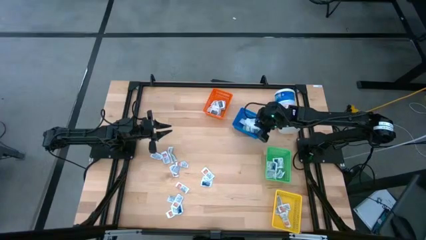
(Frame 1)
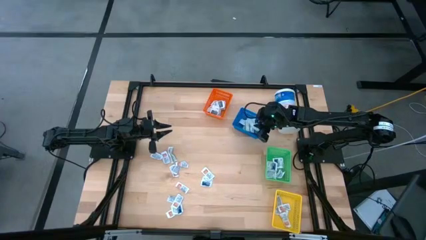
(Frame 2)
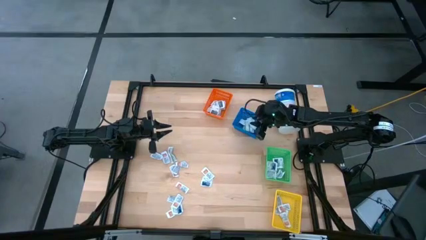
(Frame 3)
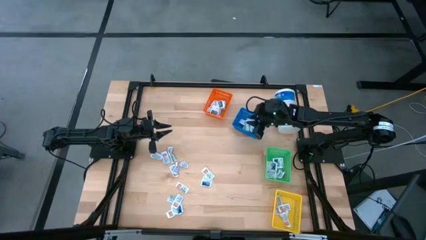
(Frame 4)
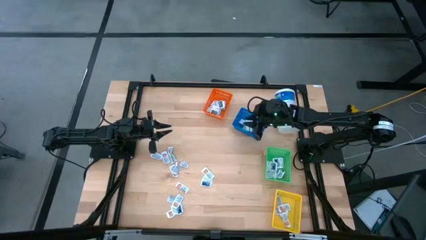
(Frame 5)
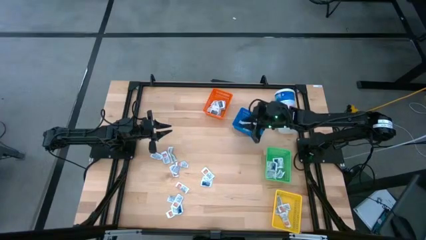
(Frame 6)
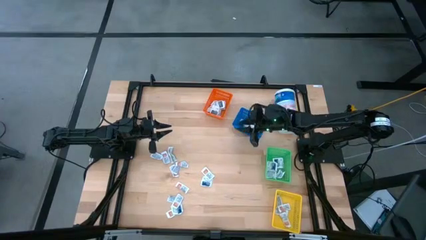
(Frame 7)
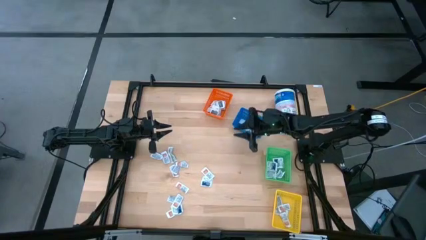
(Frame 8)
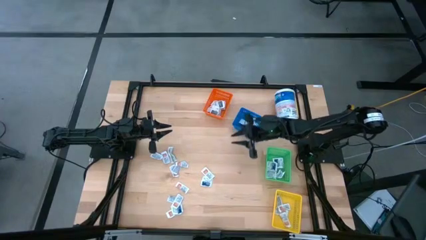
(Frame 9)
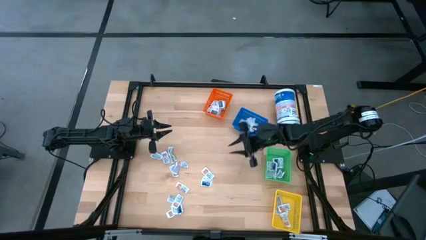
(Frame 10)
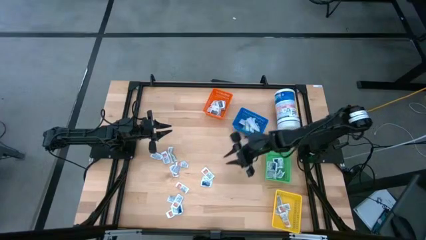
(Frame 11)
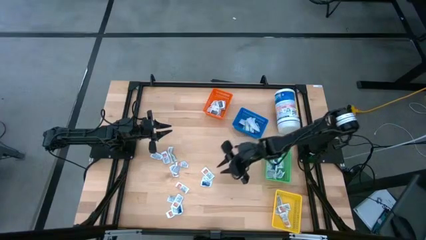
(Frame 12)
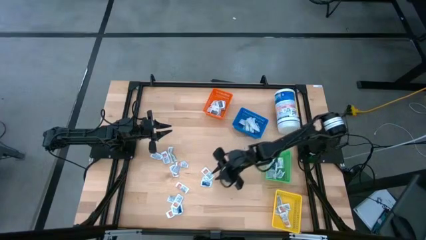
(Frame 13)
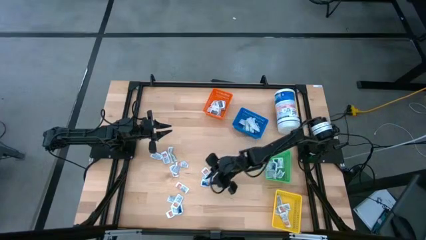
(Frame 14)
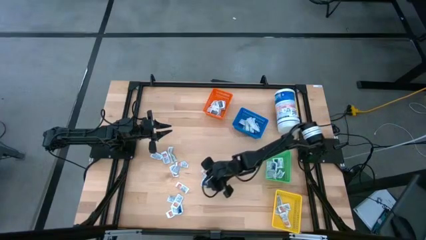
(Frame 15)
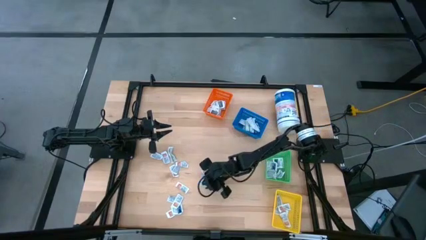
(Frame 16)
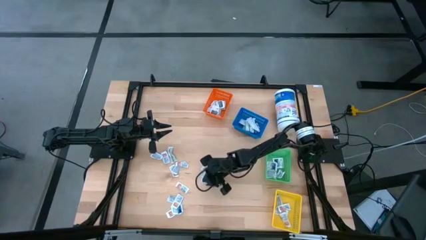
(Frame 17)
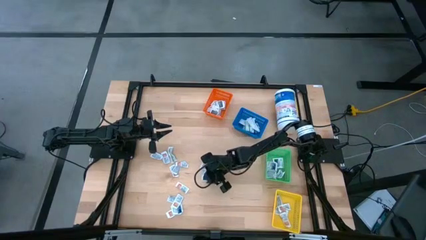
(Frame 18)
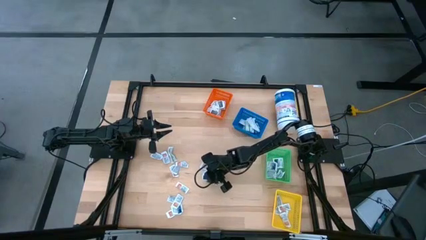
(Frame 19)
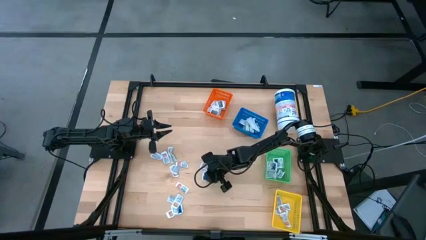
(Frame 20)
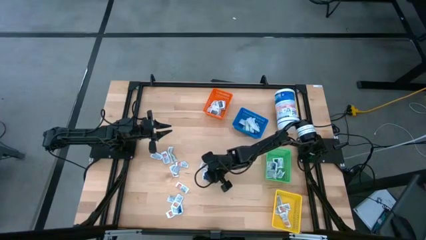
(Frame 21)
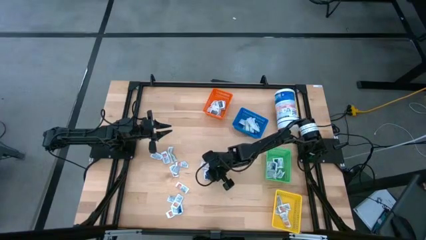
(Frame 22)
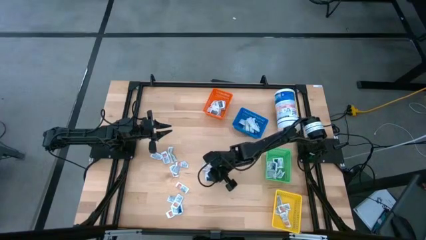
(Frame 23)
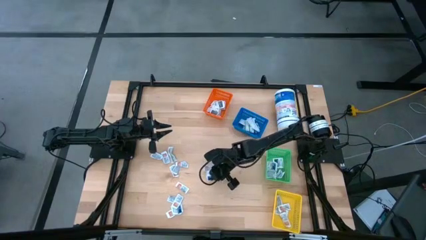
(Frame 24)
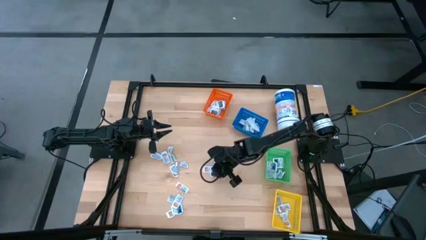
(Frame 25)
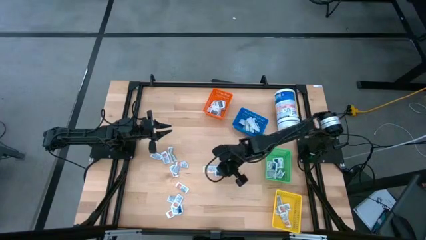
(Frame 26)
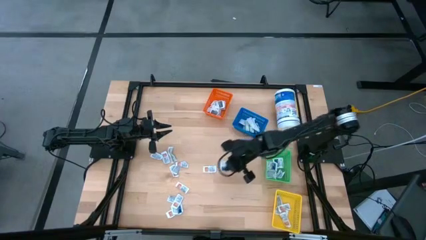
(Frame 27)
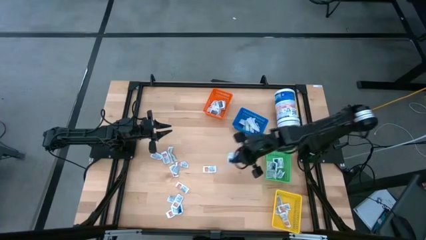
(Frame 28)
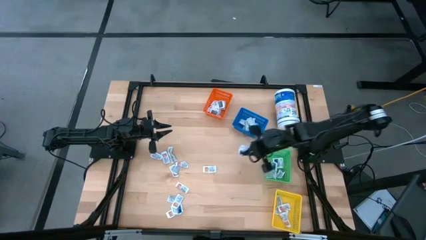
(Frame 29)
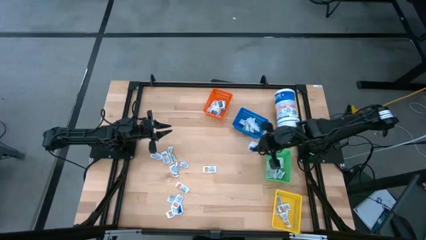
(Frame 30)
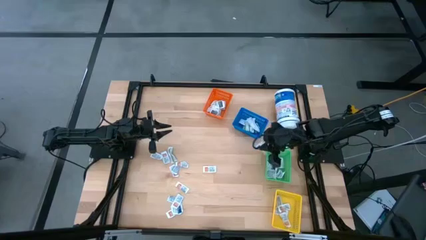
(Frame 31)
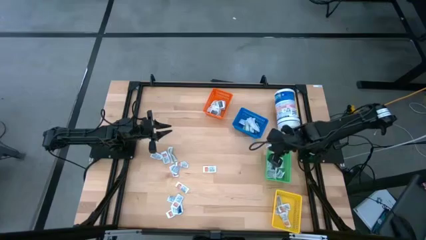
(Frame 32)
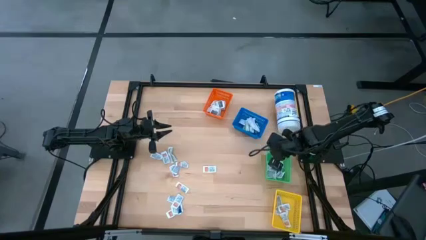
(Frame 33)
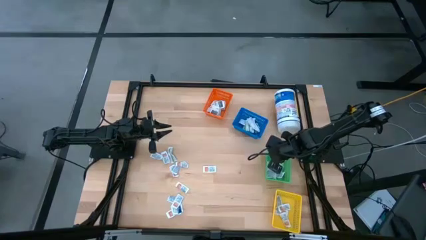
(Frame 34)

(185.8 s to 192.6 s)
Task: Pick & Place First Aid Supplies
Put the blue alcohol pad into the green basket

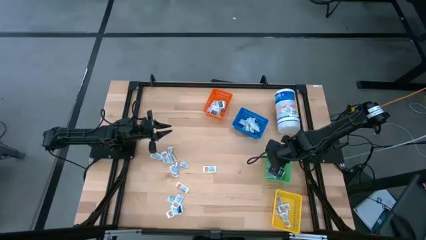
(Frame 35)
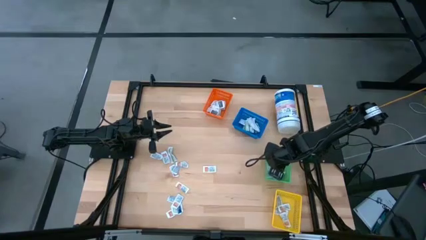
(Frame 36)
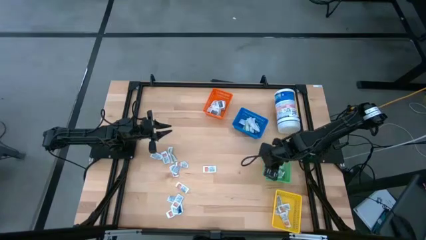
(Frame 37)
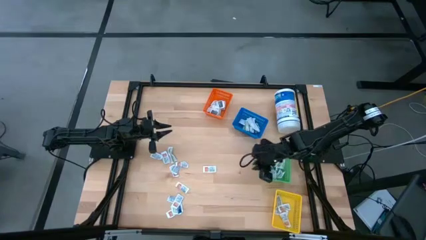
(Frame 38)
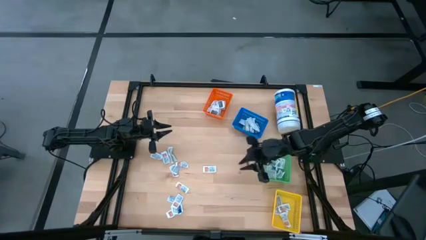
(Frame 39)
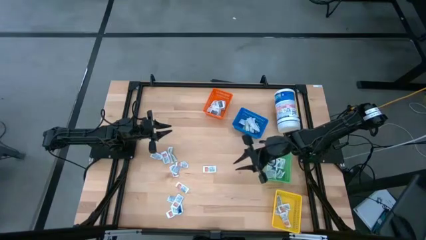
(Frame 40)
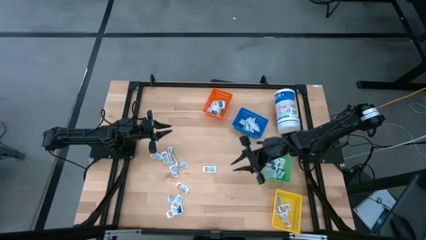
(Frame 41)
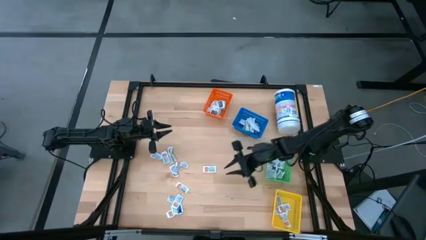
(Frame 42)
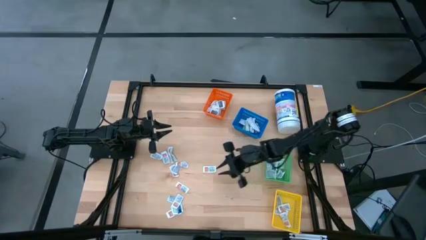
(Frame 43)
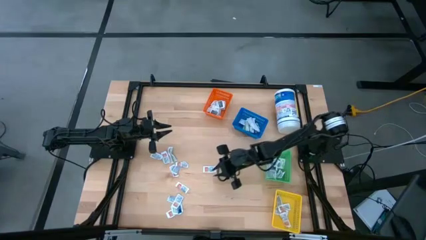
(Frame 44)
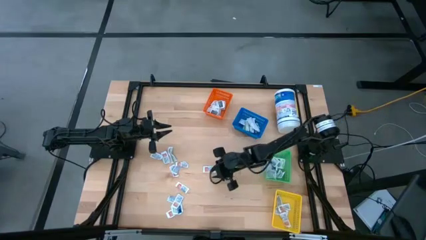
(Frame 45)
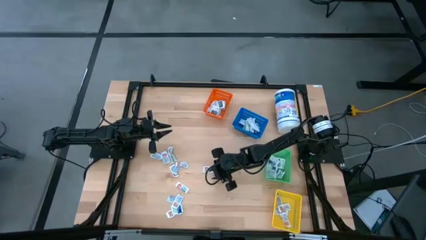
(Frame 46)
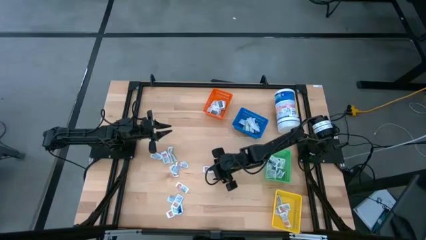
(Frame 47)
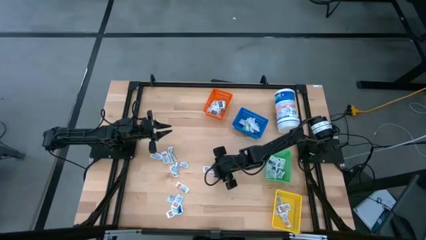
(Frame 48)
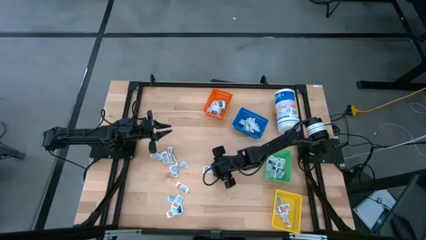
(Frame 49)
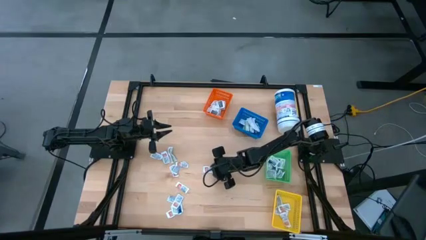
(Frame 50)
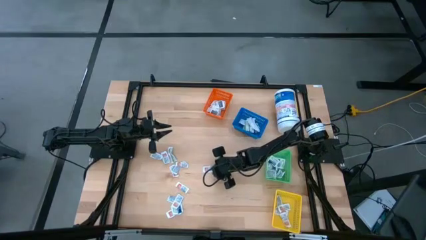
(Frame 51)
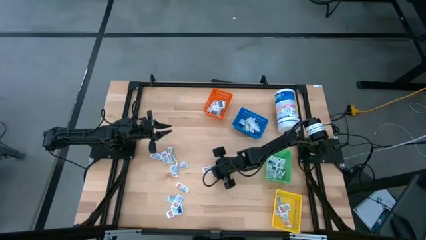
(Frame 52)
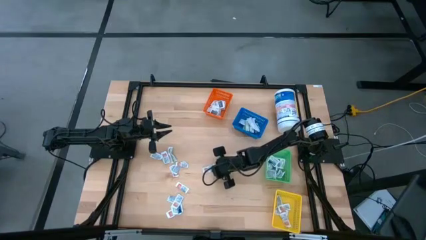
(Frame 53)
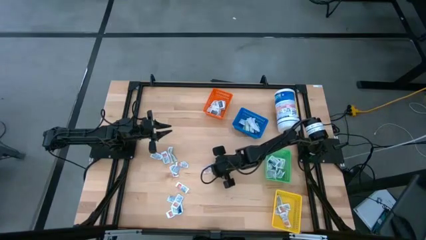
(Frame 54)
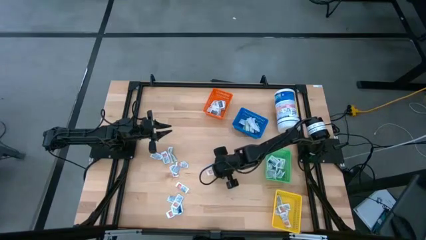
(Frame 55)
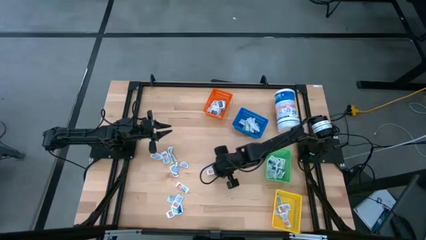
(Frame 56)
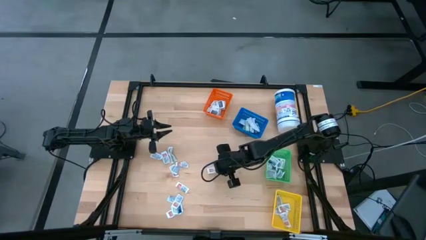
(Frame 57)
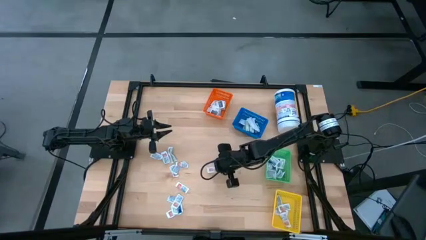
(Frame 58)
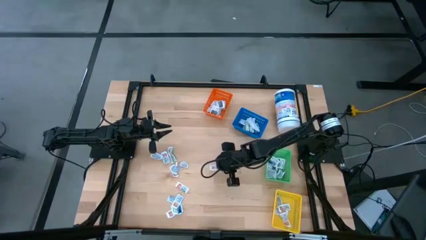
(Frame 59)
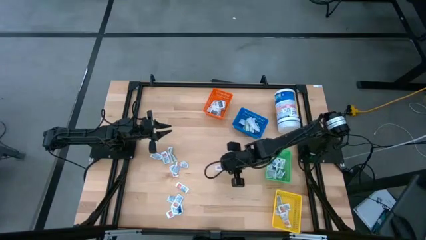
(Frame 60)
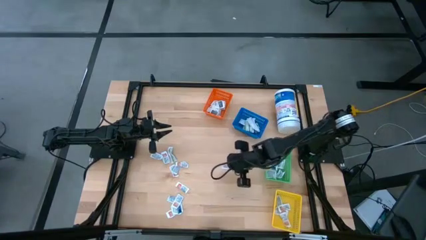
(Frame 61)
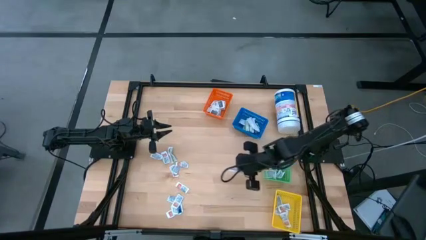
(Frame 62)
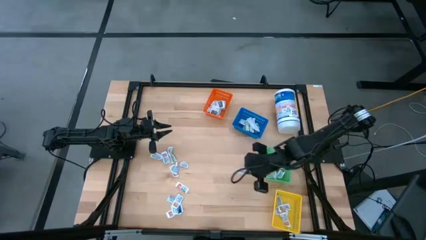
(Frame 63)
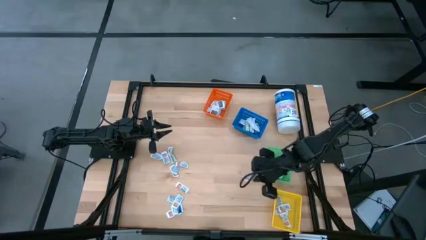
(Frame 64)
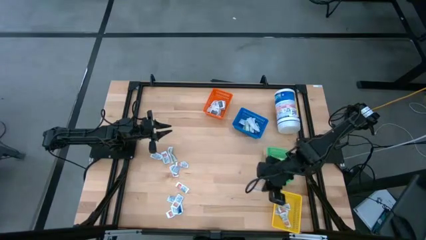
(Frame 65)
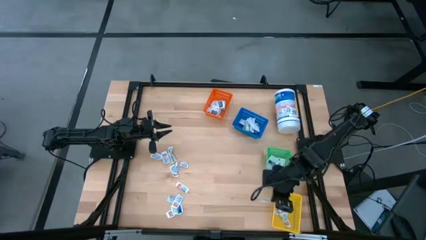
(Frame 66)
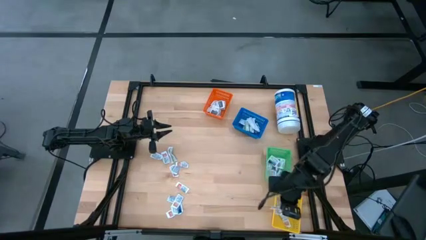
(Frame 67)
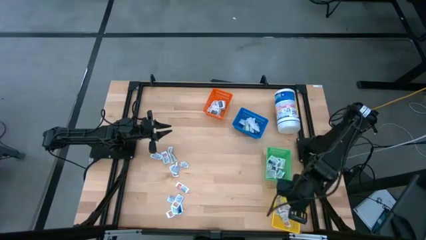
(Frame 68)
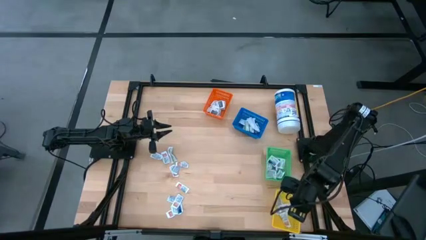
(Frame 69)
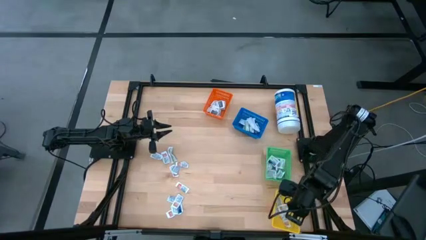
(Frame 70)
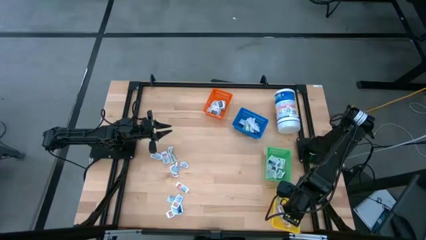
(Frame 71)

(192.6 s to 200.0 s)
Put the orange ointment pack into the yellow basket

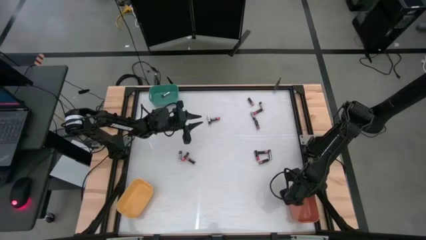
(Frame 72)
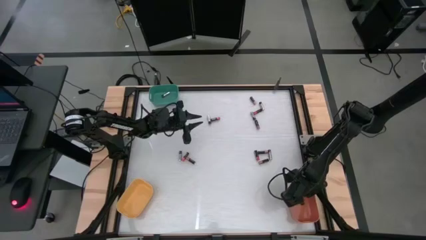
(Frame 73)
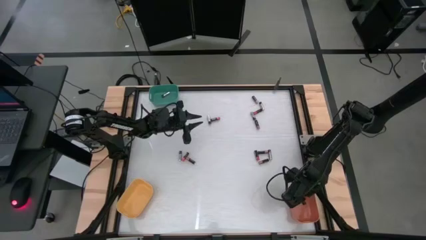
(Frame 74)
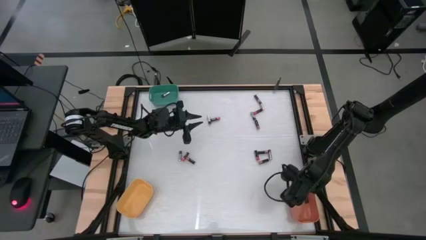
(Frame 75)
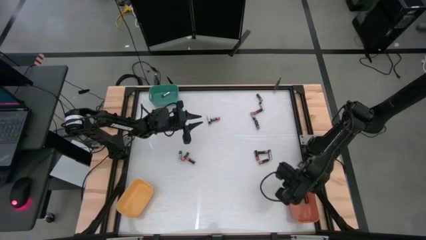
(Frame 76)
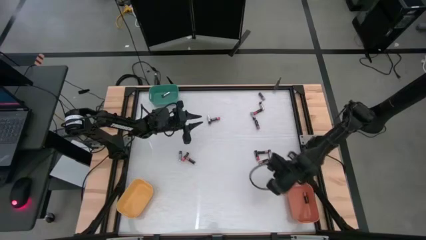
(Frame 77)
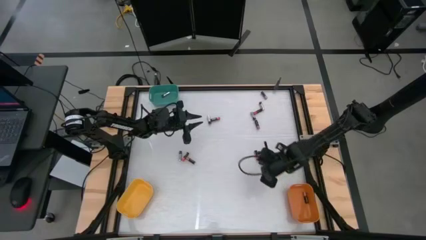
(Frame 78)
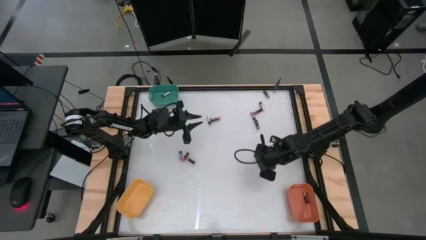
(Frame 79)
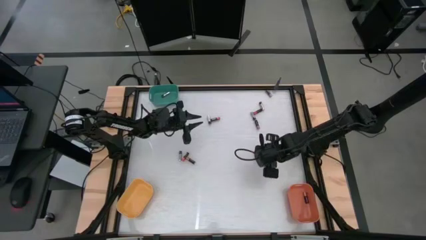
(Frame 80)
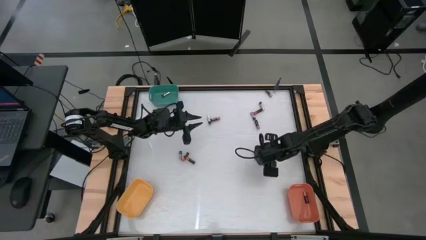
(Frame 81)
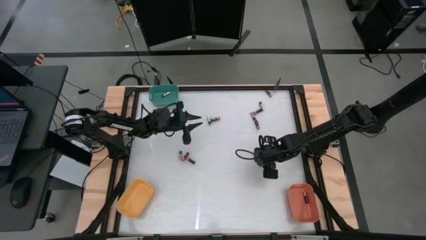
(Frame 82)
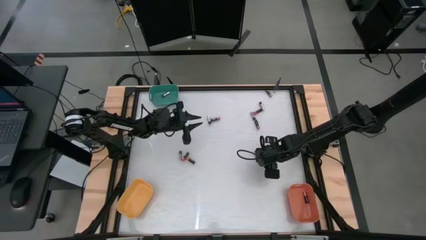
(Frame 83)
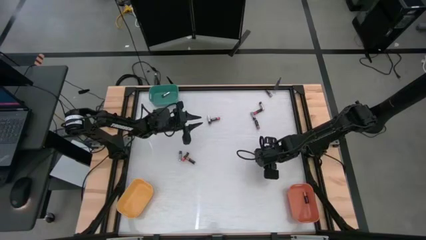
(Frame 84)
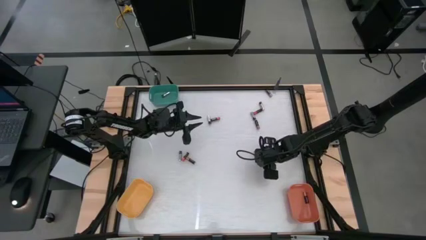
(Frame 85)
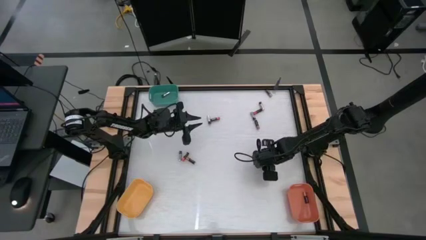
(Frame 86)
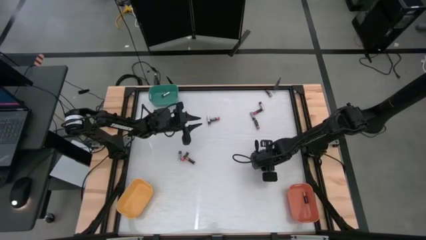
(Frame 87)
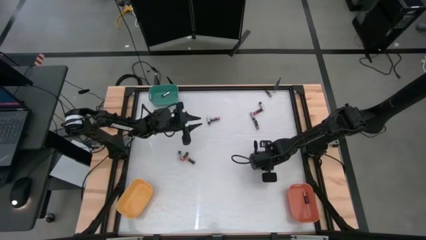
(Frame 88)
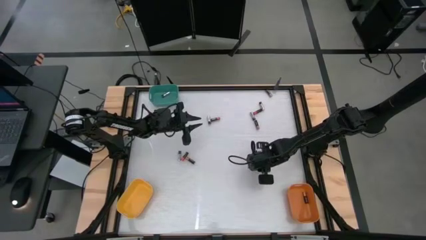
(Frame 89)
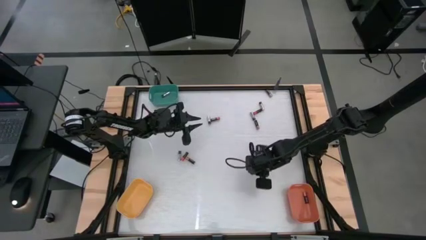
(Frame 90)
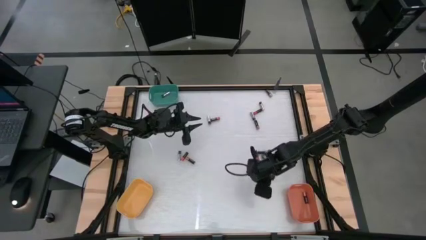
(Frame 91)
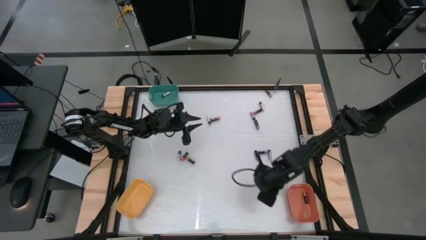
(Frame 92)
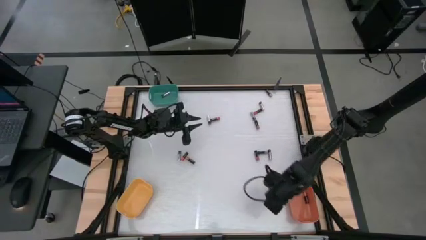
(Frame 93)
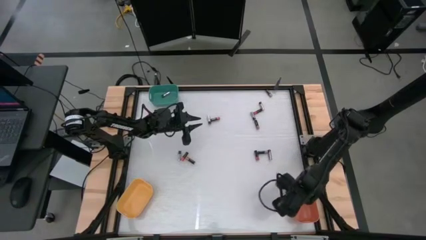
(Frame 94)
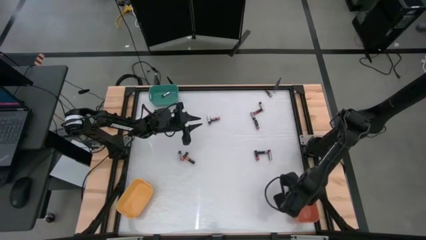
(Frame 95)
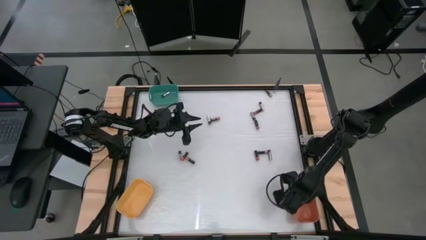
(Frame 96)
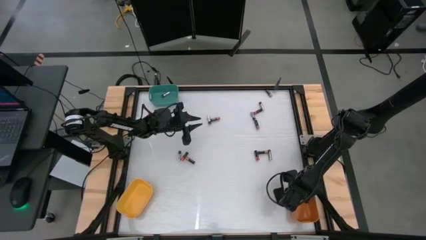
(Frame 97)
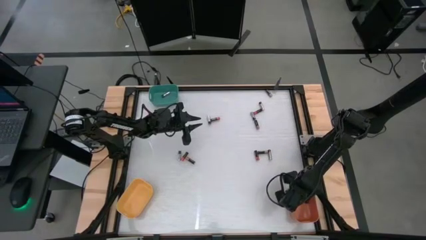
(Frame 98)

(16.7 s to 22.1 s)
Task: Sort batteries
Put the middle right gold battery to the left of the red battery into the orange bin
